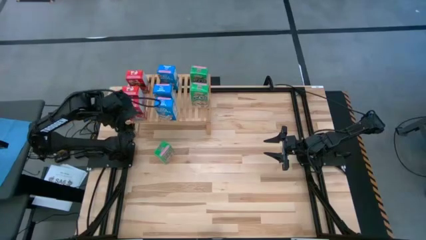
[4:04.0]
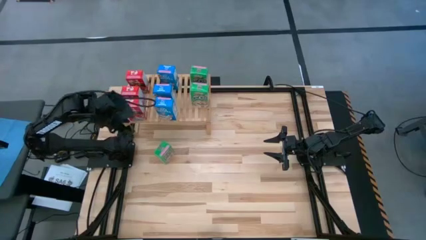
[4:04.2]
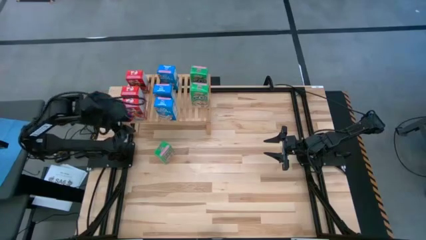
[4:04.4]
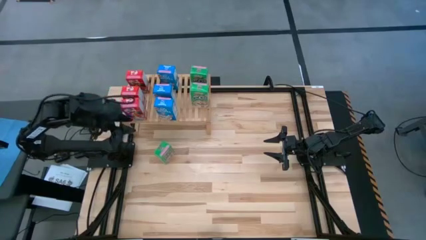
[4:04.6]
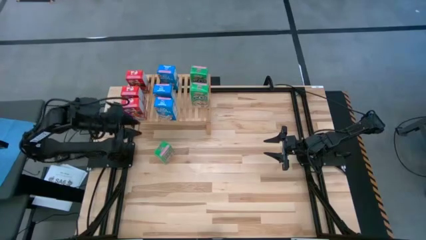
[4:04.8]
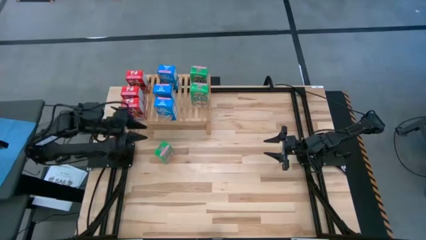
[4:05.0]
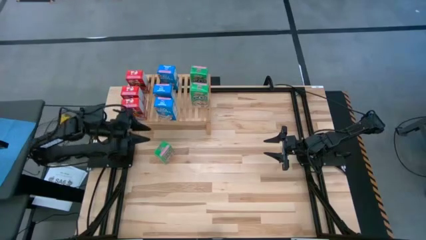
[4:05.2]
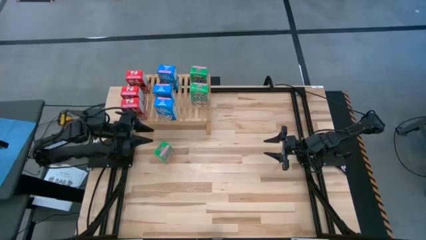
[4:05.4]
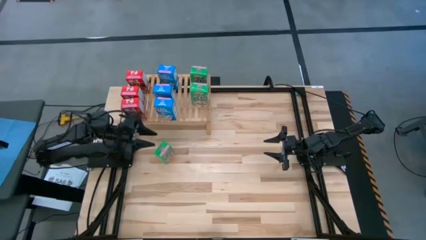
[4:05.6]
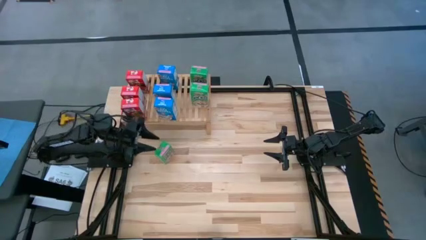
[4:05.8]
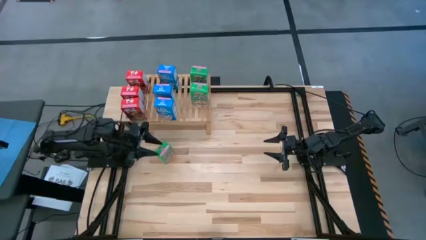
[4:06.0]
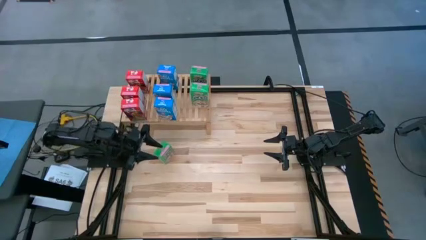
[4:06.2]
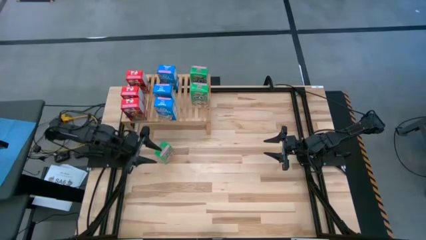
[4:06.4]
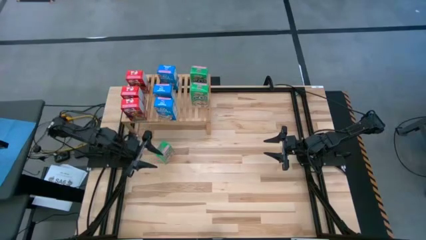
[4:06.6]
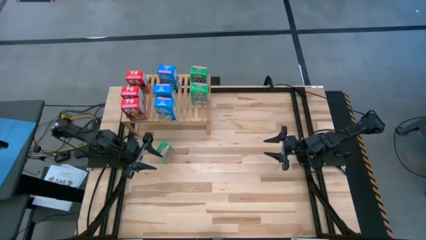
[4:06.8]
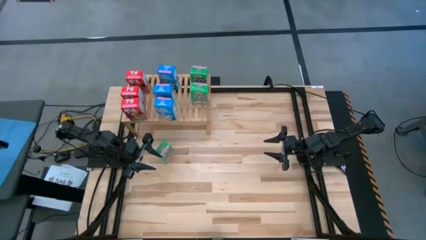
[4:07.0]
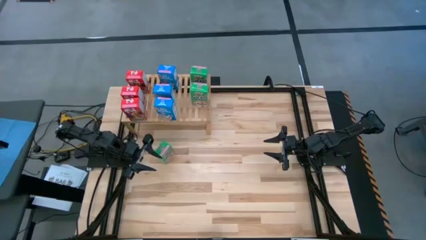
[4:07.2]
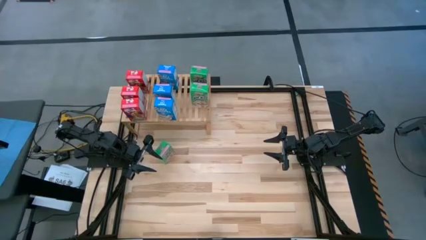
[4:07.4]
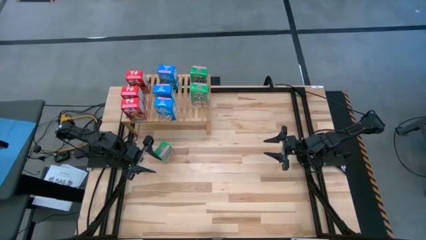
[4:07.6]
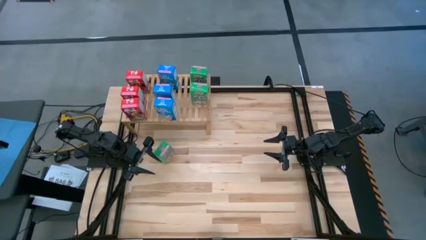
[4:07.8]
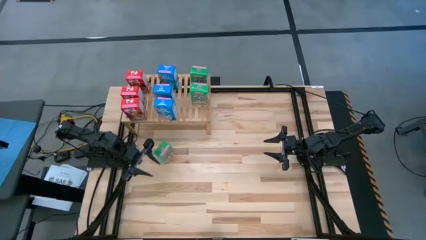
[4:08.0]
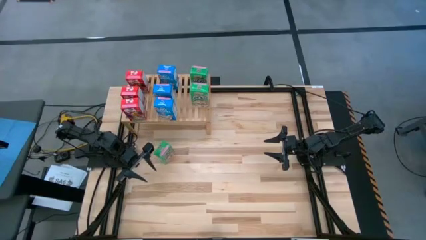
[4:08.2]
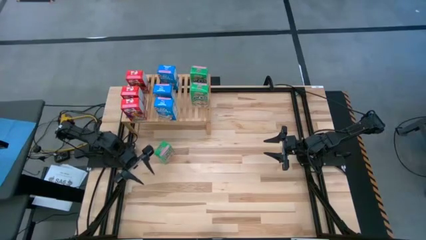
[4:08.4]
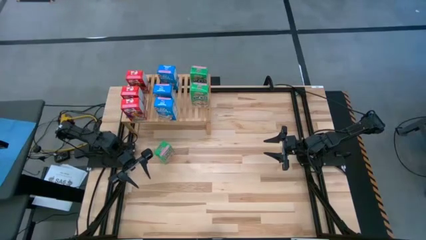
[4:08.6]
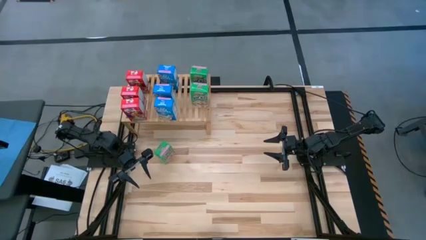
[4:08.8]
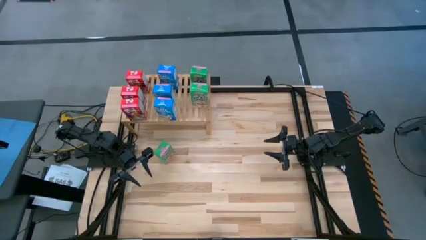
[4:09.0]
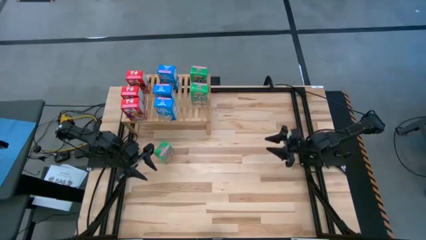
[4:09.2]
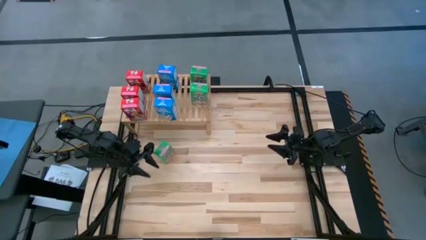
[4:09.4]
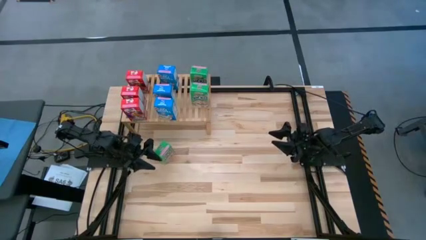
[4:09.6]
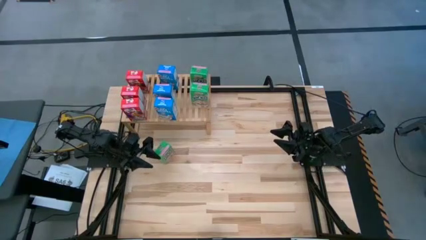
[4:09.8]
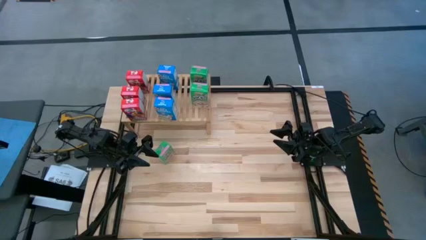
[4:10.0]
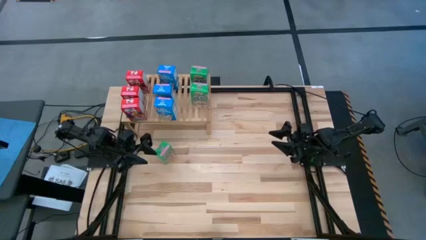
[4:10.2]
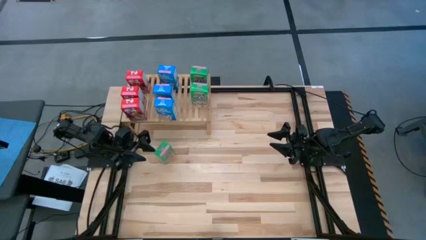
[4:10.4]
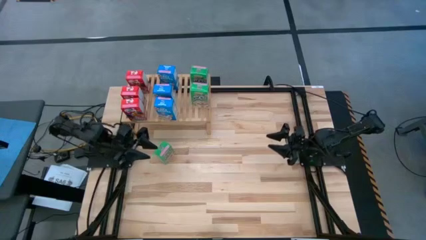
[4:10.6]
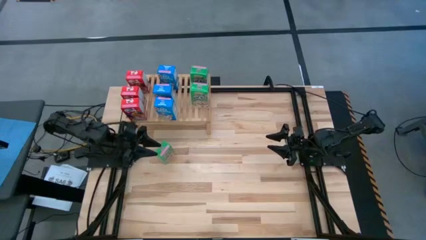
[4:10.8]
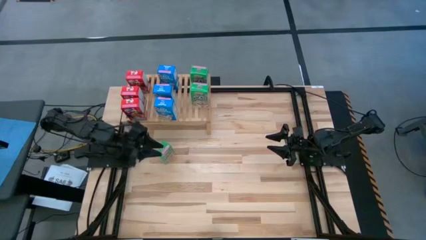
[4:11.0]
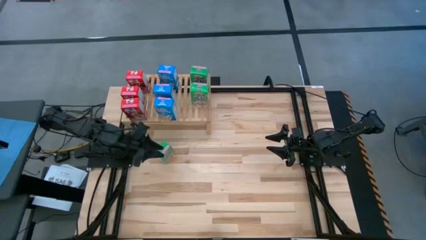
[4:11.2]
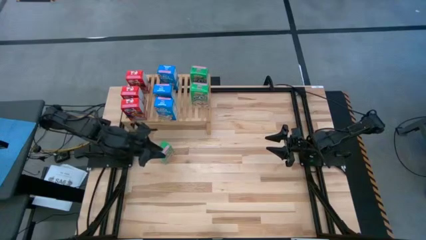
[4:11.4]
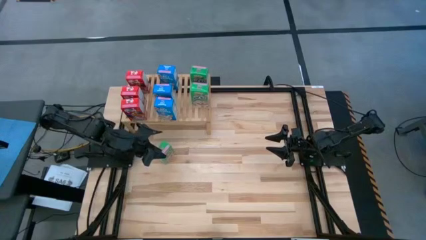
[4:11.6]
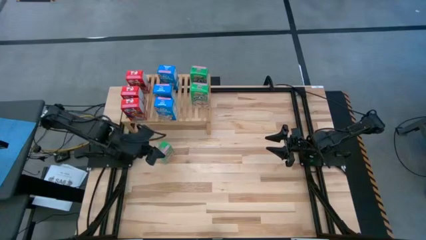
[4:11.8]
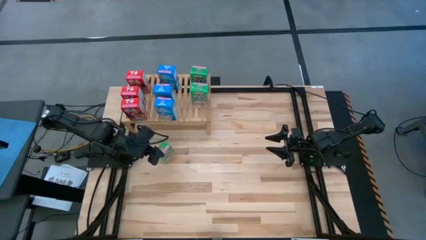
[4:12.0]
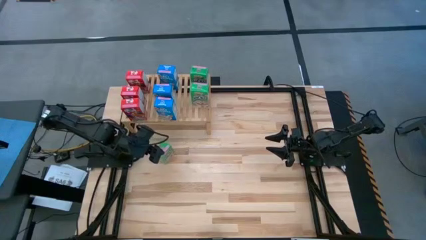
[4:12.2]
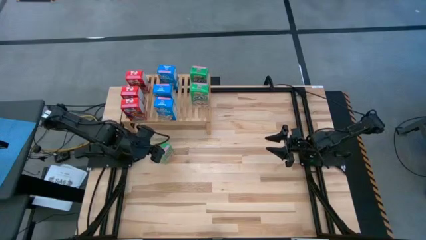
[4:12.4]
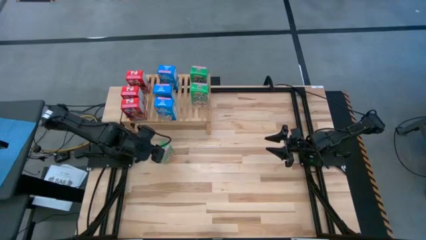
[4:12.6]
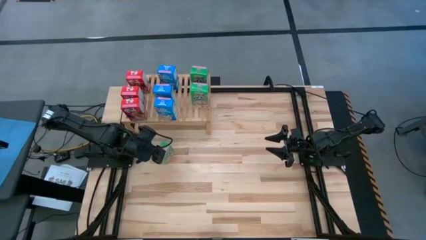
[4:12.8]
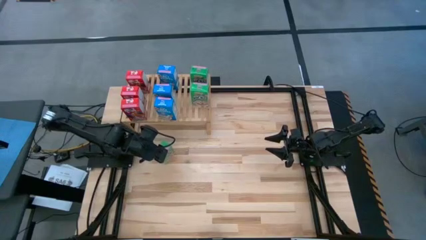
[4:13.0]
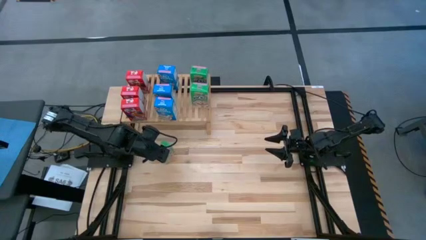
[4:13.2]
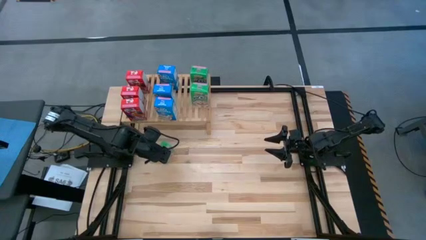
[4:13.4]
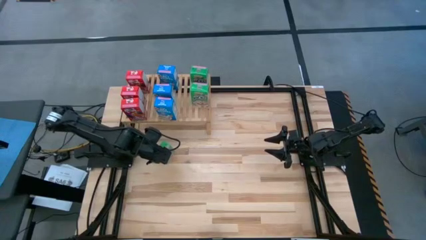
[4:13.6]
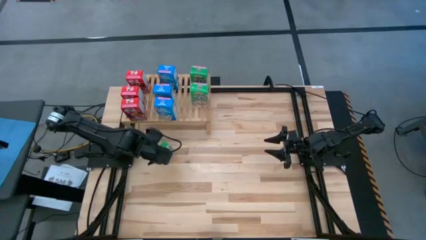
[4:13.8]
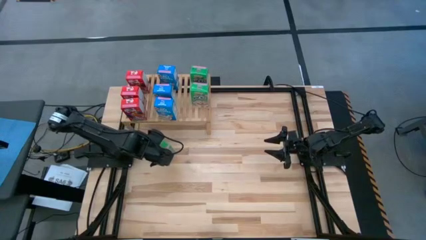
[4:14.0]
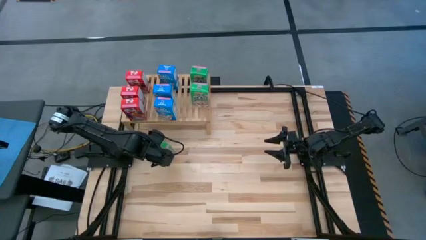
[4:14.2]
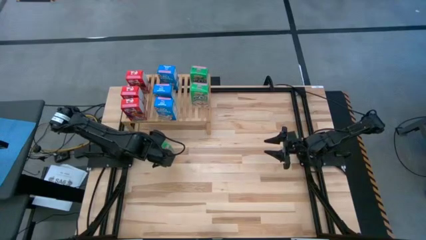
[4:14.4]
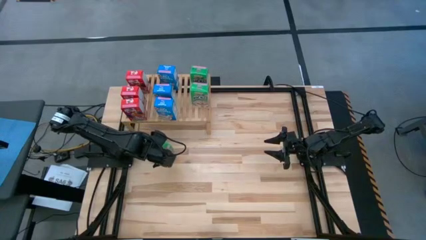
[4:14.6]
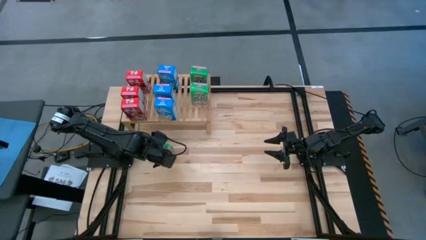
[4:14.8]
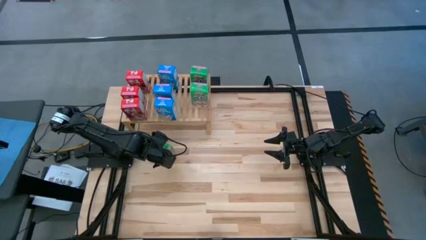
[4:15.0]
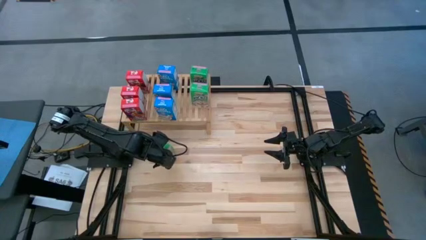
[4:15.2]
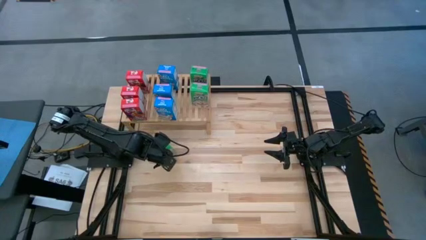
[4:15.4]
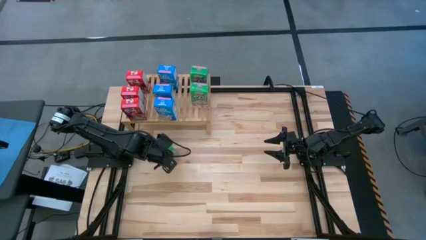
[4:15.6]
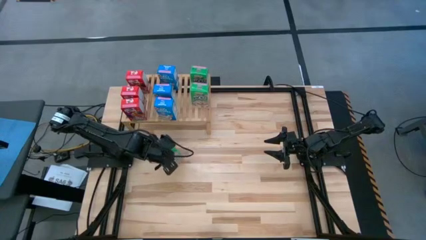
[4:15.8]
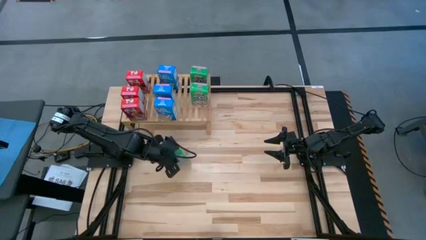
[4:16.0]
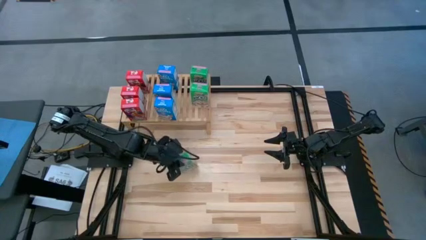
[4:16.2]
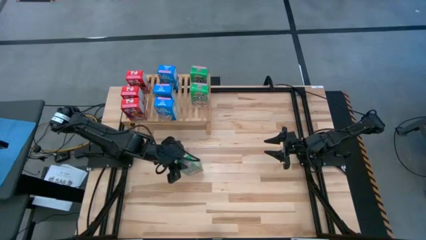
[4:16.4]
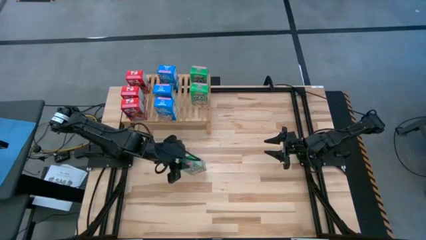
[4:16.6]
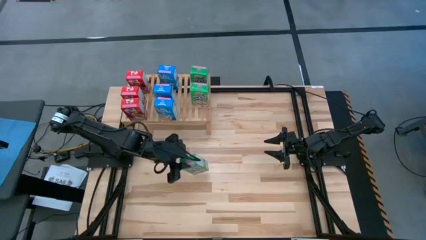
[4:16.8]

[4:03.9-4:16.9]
Task: Stack cereal on shelf
Put the green cereal box on the shelf aligned with the green cereal boxes

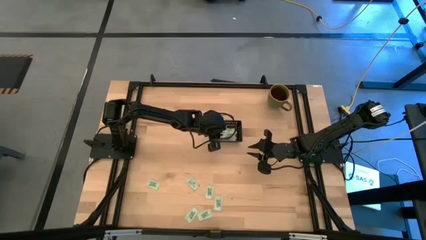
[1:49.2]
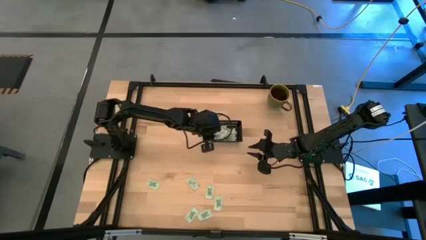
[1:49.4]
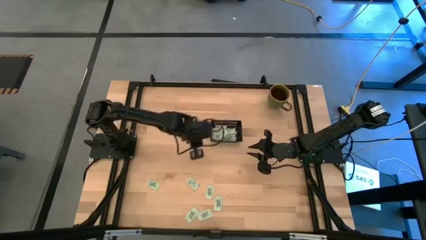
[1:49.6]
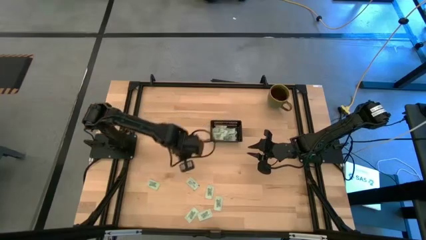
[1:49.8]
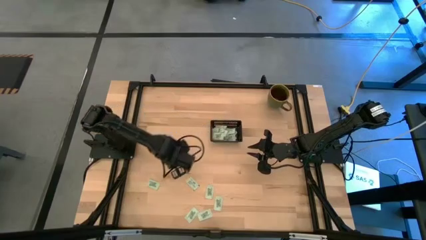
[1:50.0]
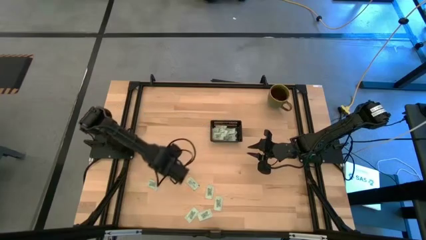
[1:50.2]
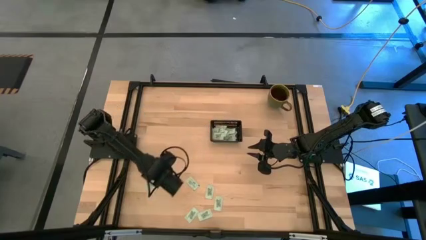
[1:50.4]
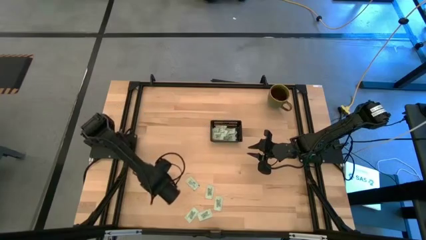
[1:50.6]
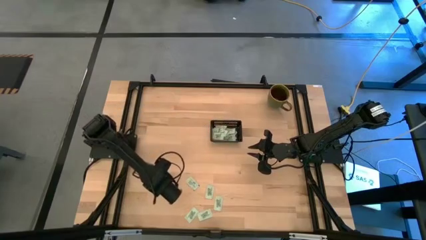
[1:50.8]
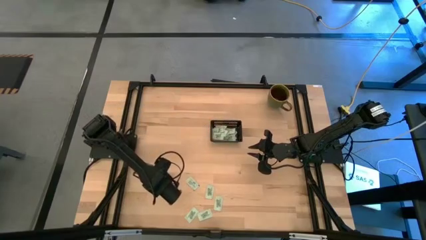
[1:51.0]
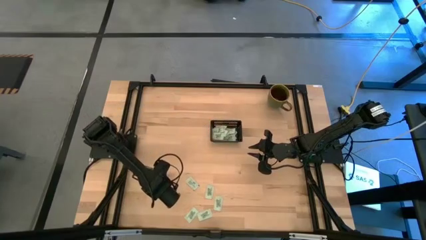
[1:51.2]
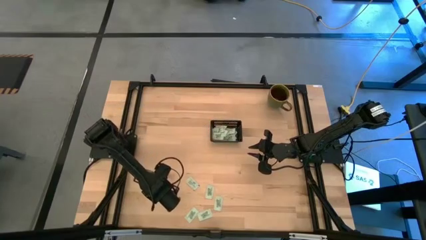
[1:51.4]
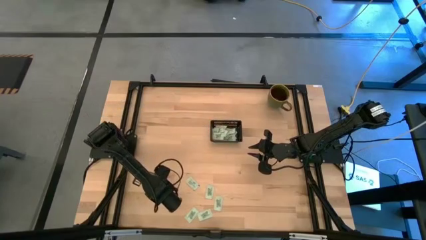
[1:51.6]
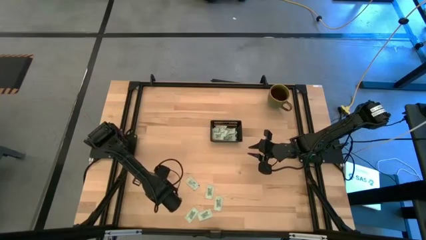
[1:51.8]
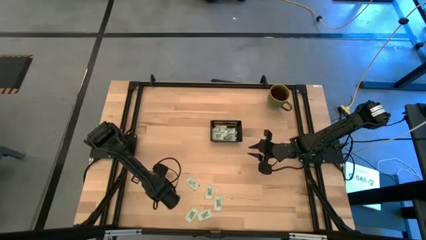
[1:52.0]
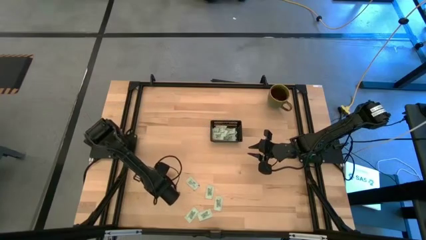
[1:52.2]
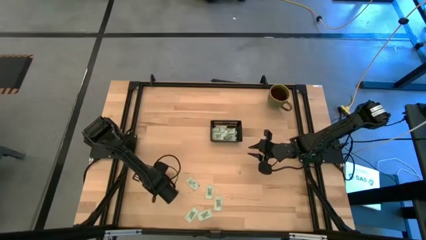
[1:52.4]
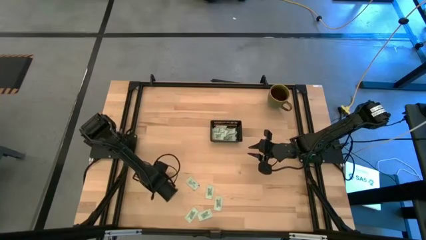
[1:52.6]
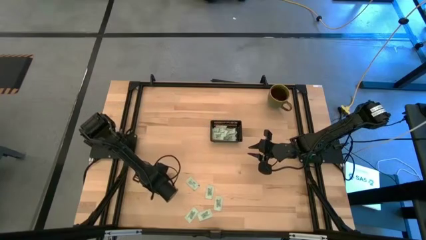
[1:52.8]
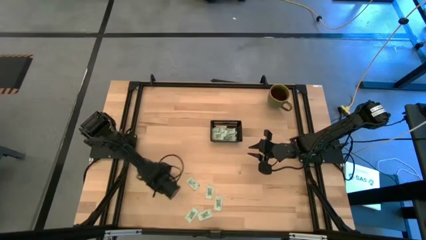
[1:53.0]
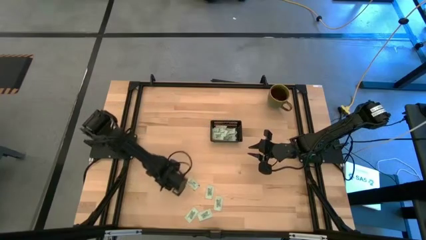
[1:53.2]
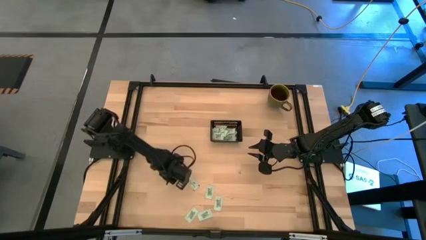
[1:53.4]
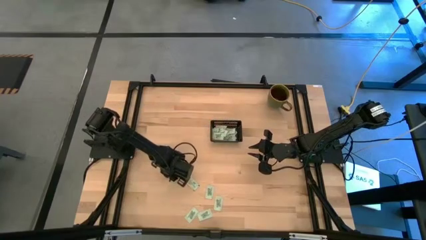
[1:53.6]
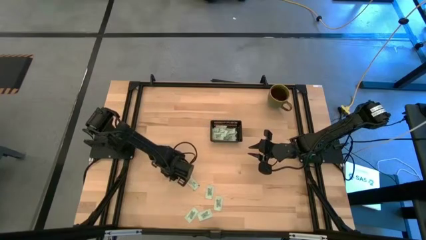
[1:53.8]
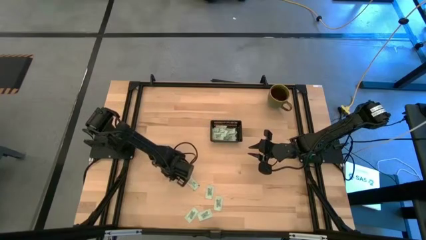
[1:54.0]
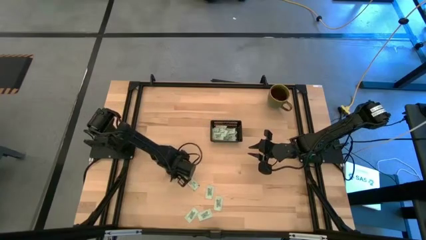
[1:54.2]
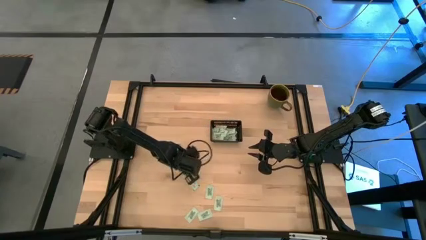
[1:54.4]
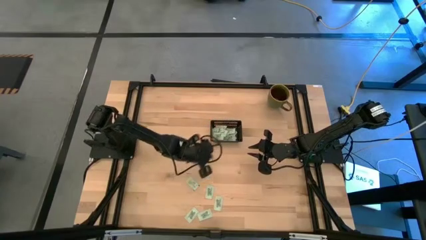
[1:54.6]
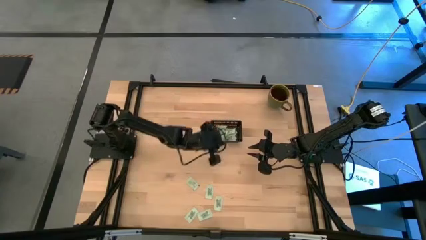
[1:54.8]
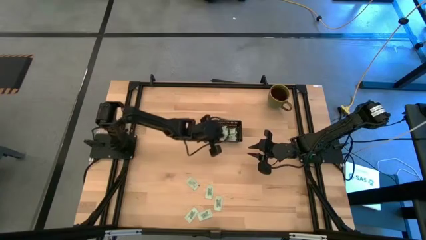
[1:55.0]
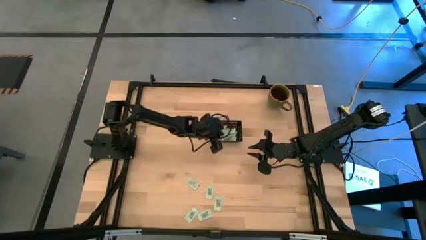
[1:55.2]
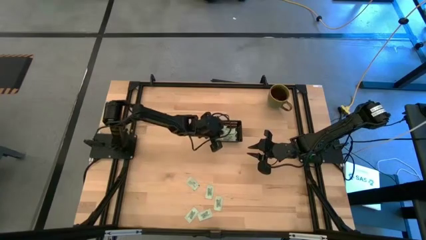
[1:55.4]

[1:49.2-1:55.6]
Task: Pick and place Stevia / Truvia into bins
Put the stevia packet into the black basket
